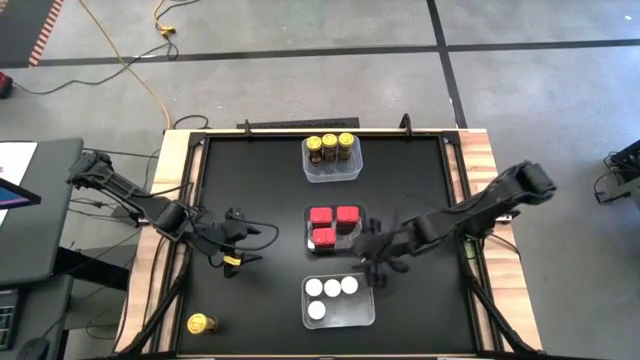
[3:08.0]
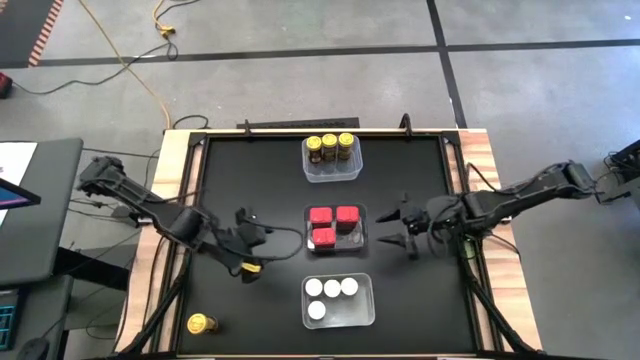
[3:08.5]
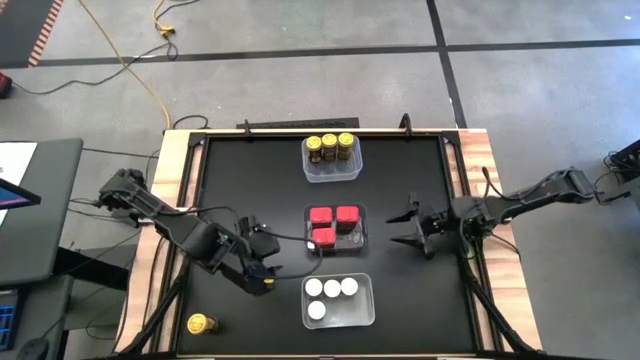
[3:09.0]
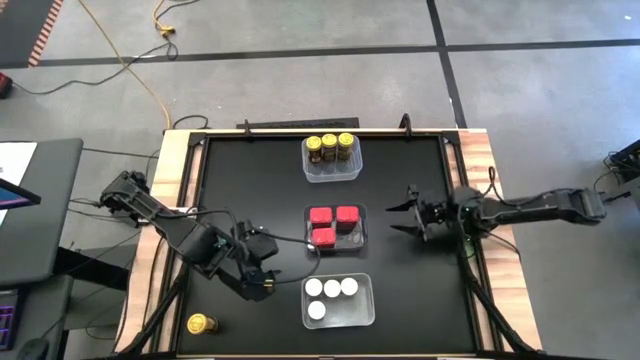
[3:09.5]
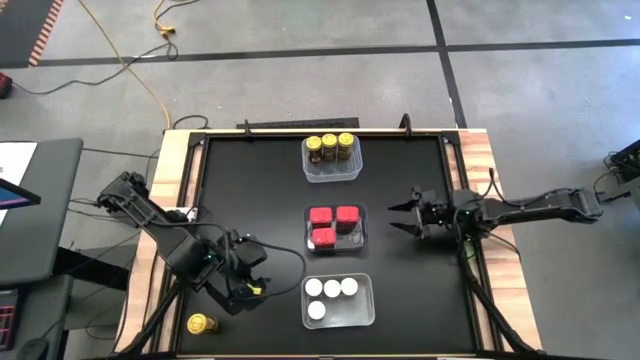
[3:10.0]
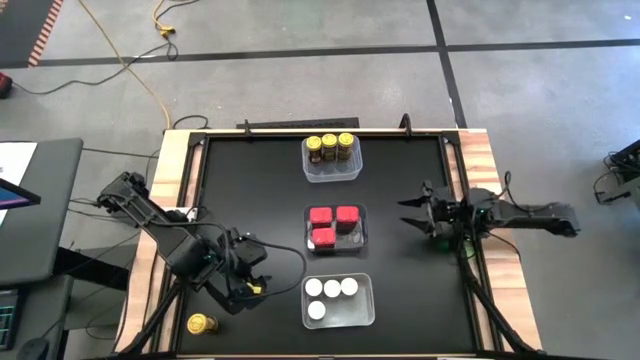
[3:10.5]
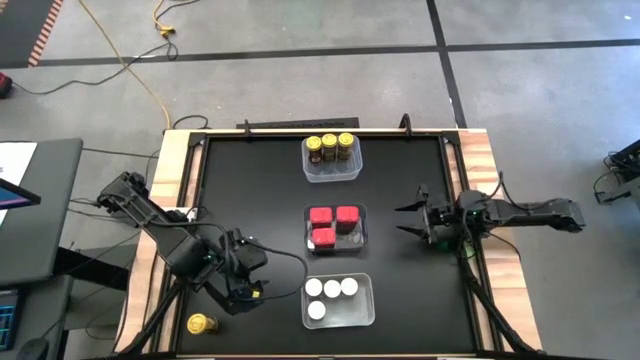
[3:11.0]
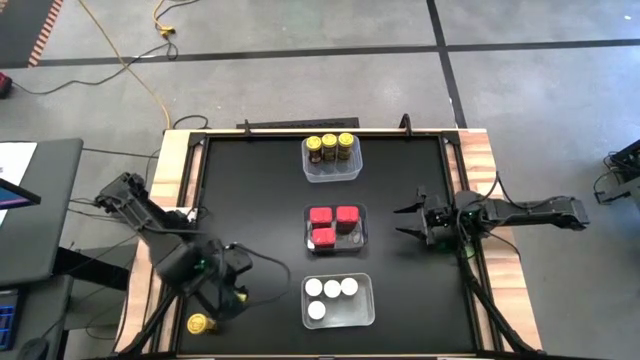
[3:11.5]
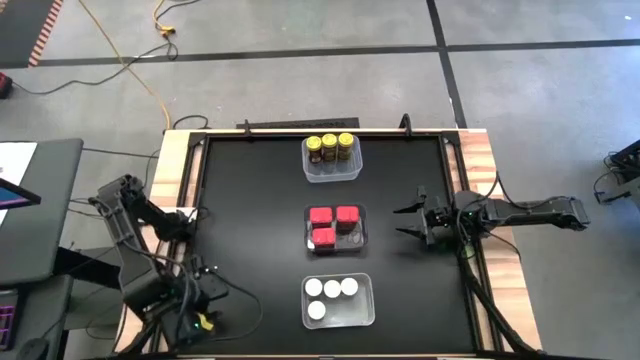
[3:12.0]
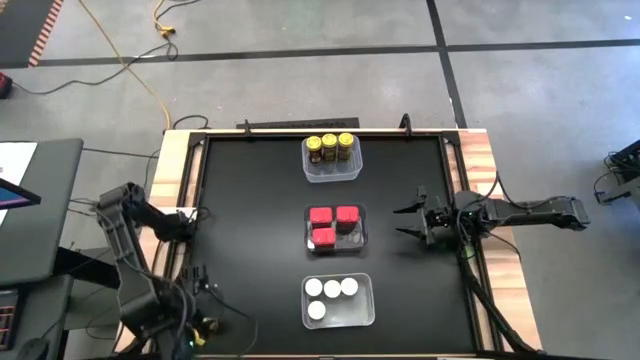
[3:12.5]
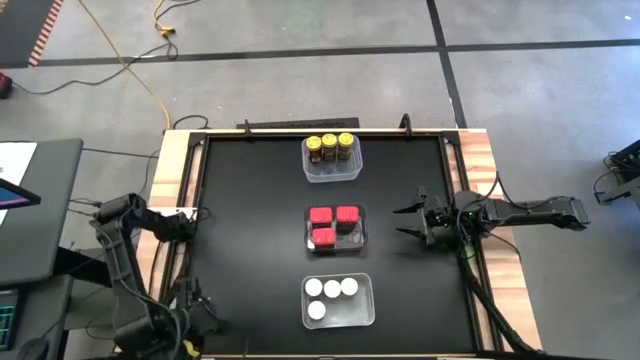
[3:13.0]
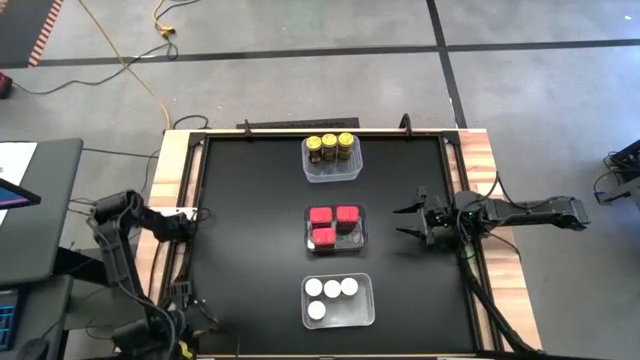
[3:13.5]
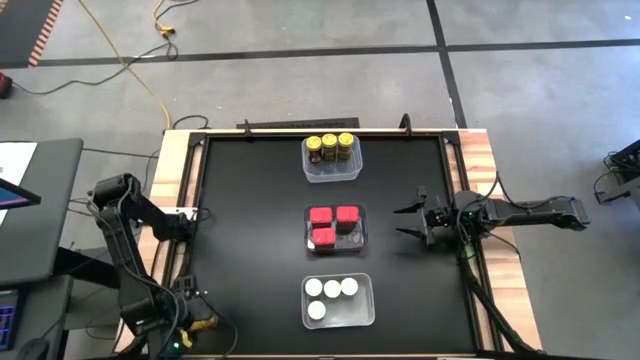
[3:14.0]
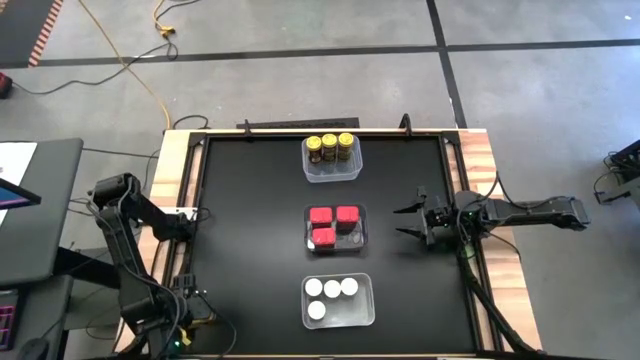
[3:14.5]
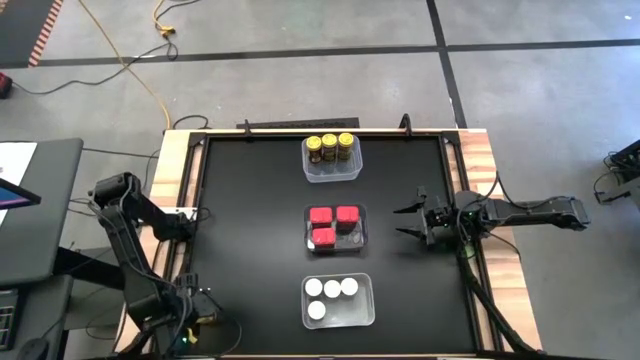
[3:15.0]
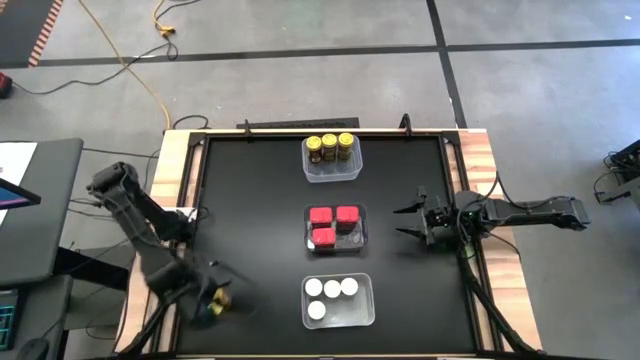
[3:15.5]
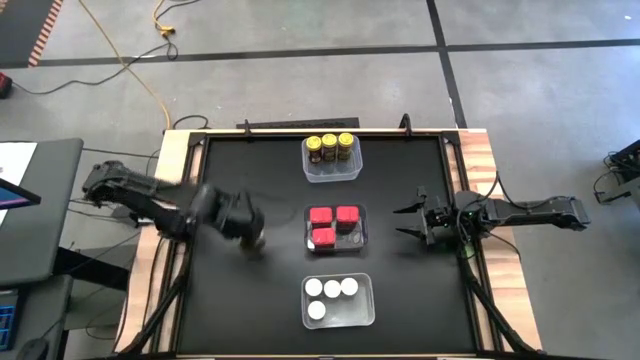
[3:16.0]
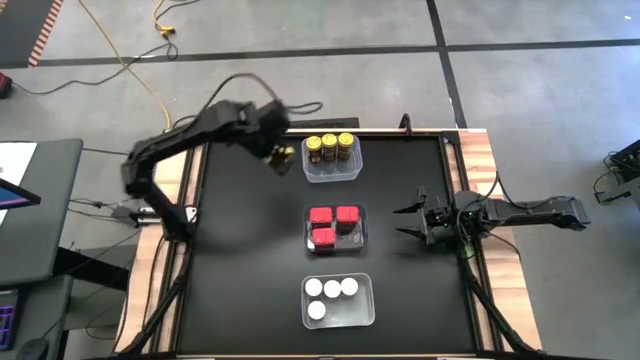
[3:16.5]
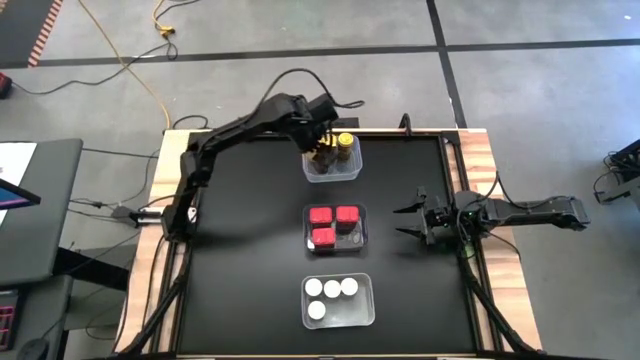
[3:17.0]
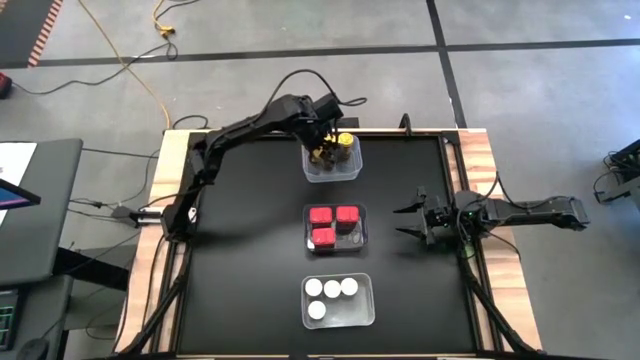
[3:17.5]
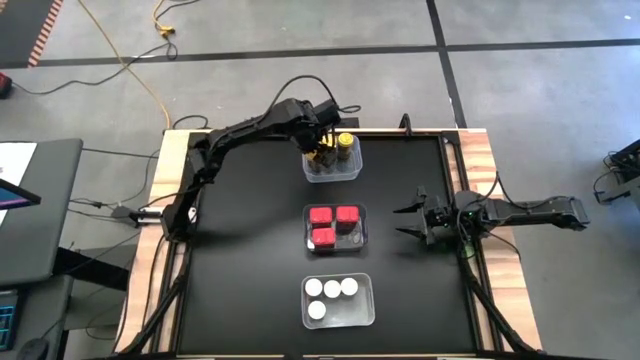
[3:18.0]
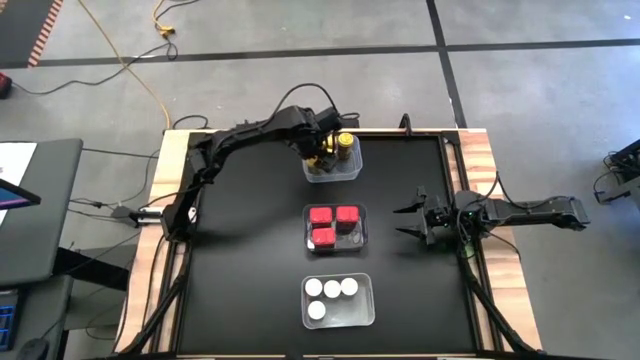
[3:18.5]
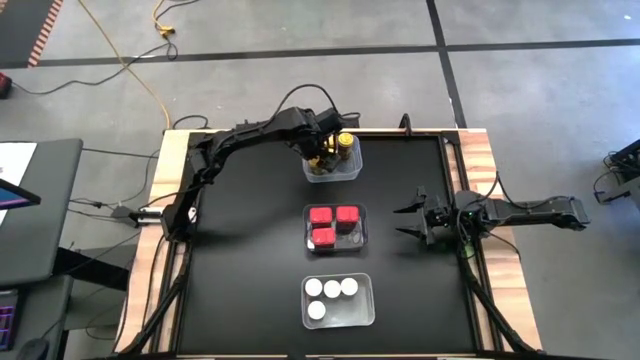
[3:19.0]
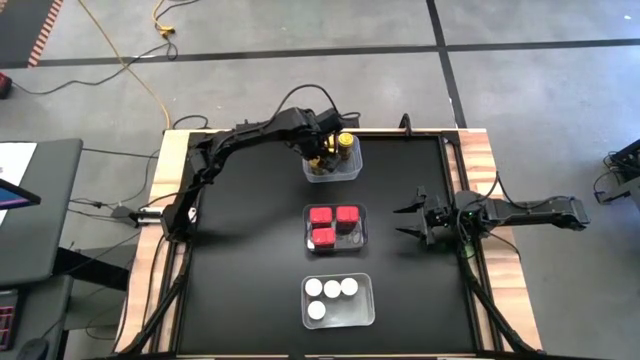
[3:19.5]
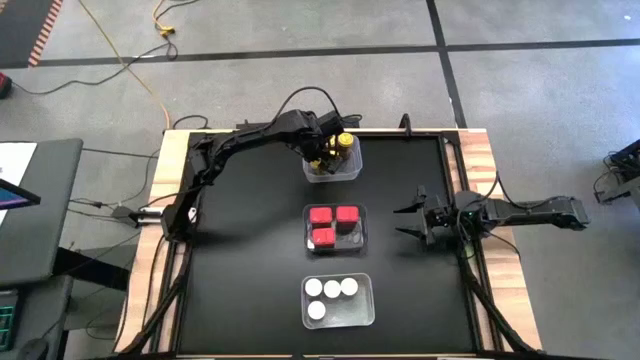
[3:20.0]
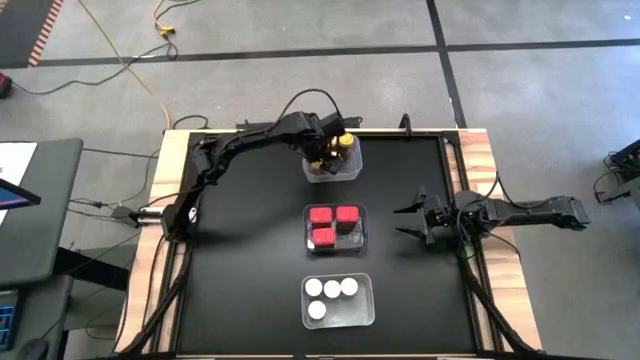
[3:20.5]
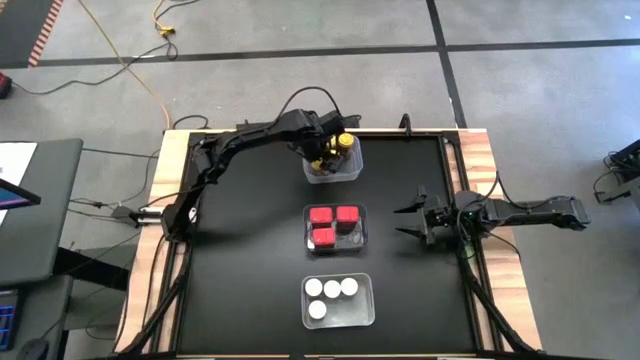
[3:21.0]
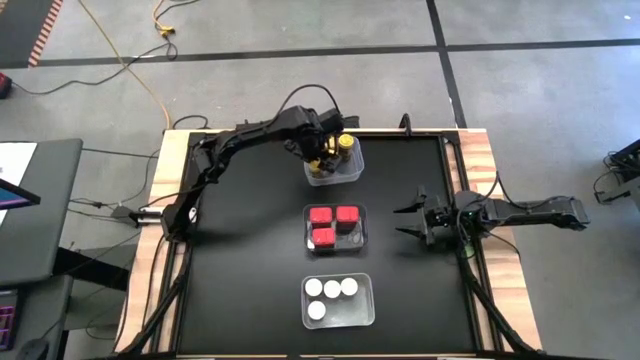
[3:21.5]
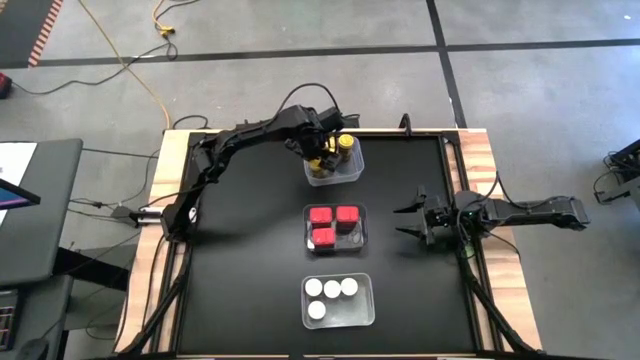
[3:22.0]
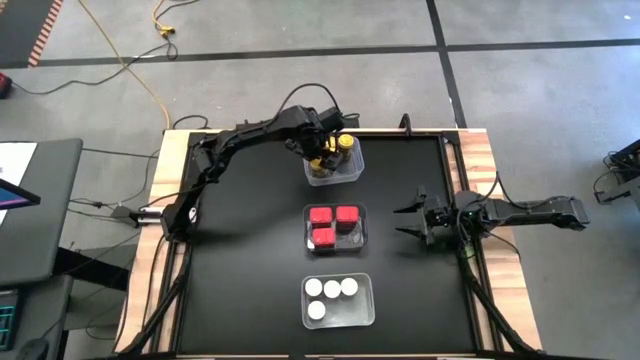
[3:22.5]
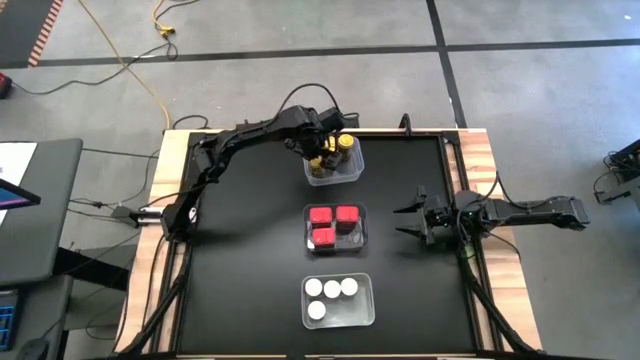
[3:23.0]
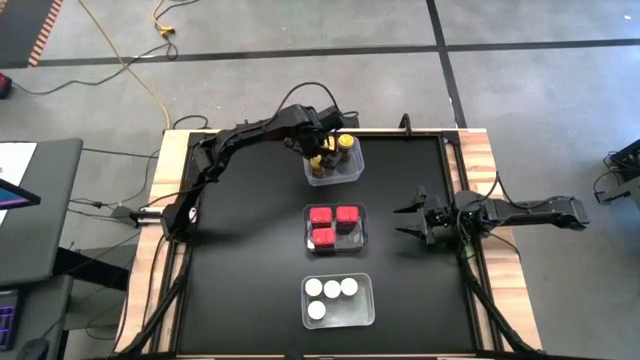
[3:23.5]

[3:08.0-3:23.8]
Task: Sort spices by type
Put the yellow seasoning bottle into the transparent bin

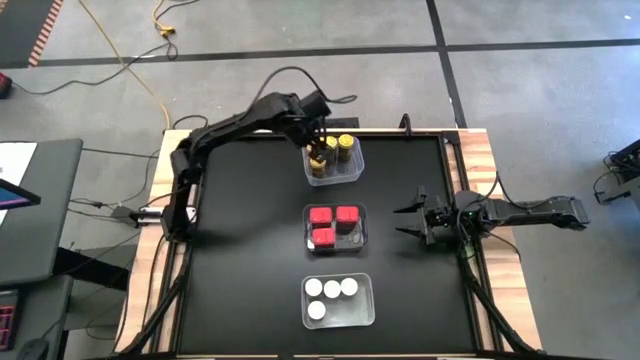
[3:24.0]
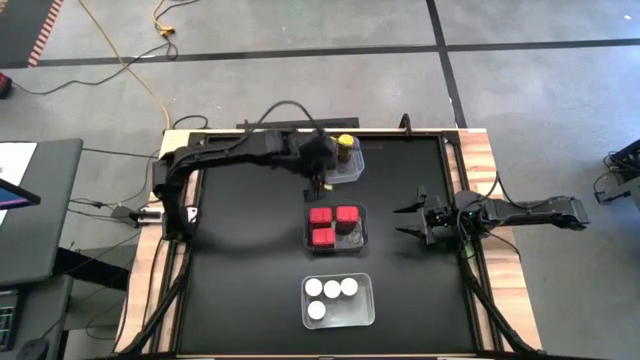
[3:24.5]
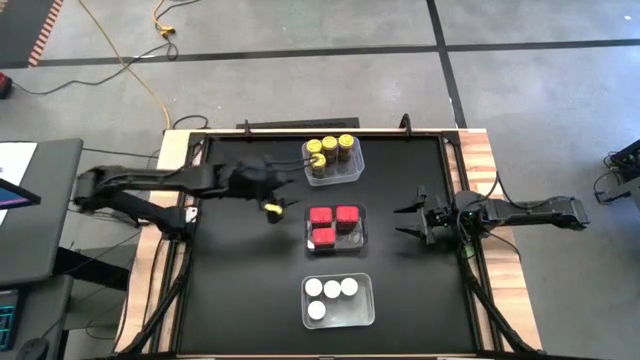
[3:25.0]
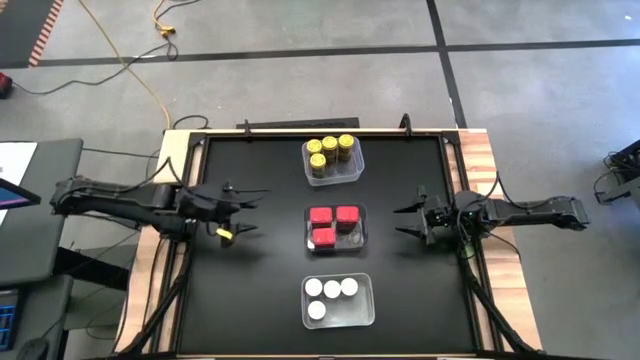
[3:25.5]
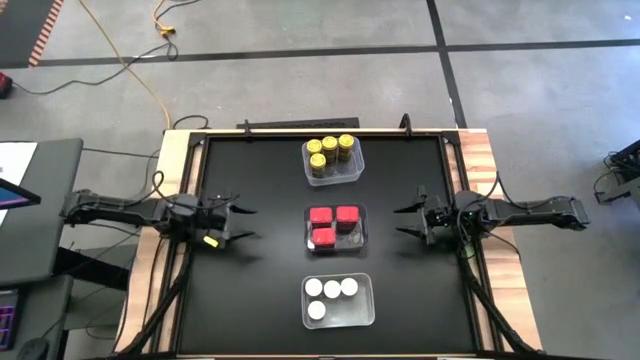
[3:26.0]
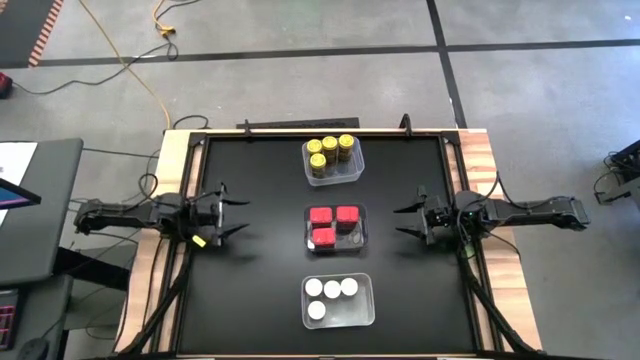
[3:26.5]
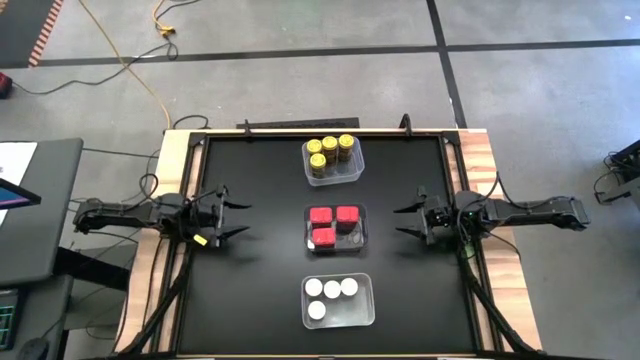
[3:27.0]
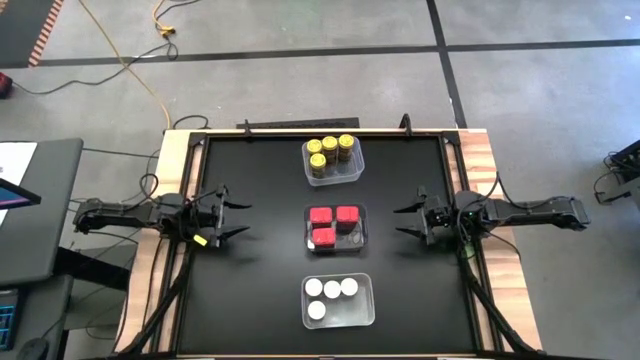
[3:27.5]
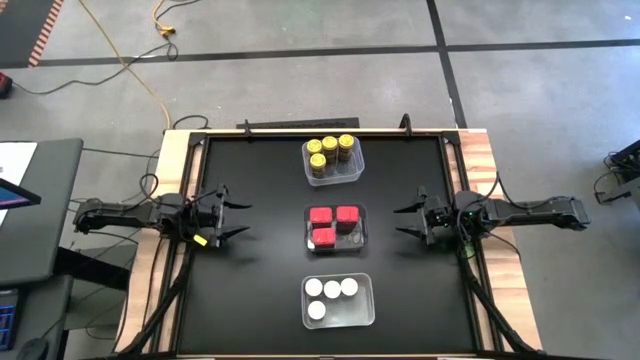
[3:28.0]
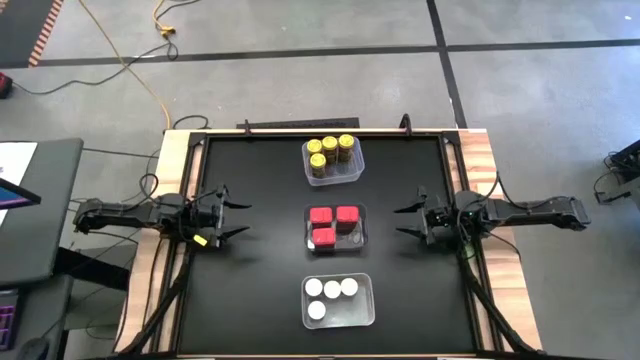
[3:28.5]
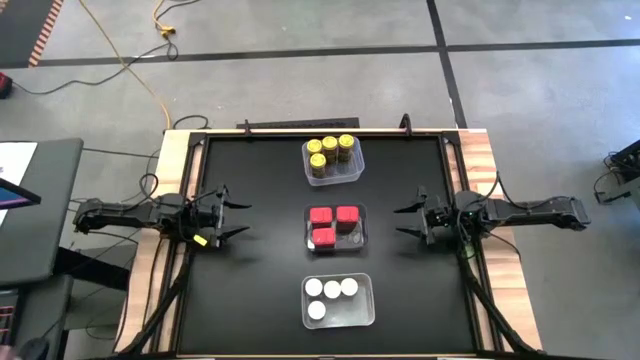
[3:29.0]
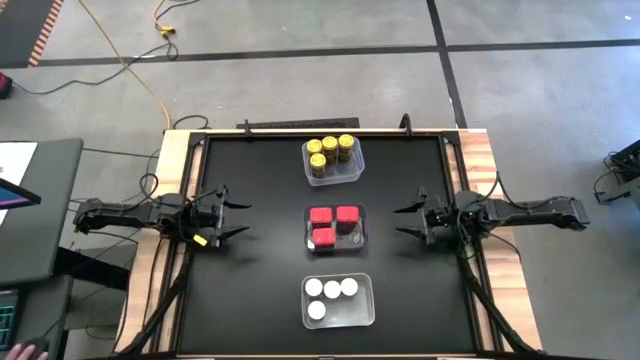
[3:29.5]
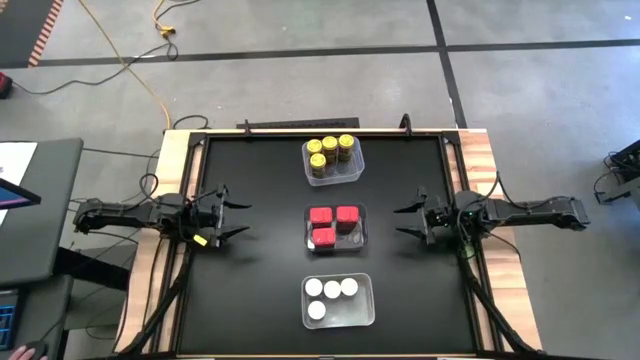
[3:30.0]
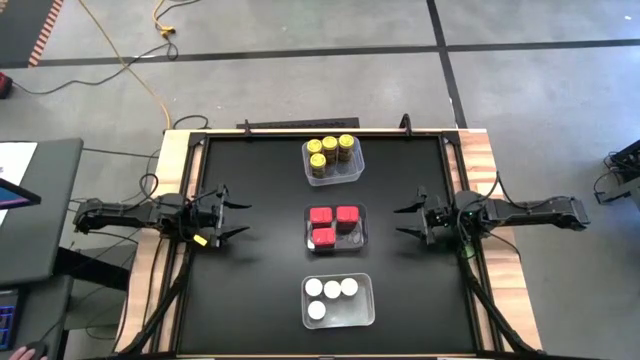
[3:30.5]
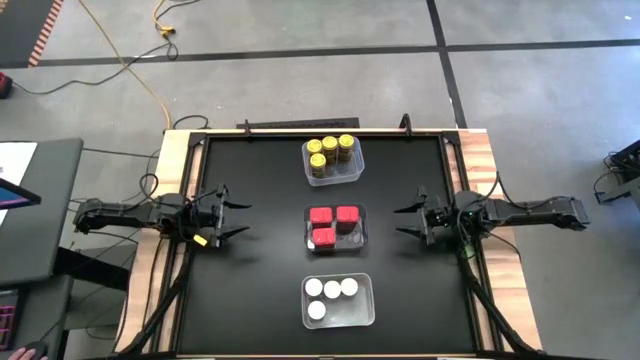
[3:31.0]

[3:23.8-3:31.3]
Return to Home Position
